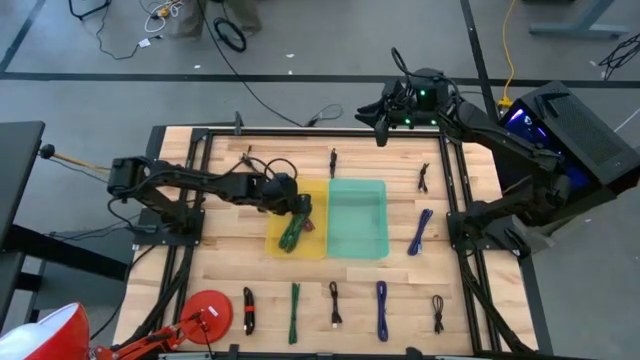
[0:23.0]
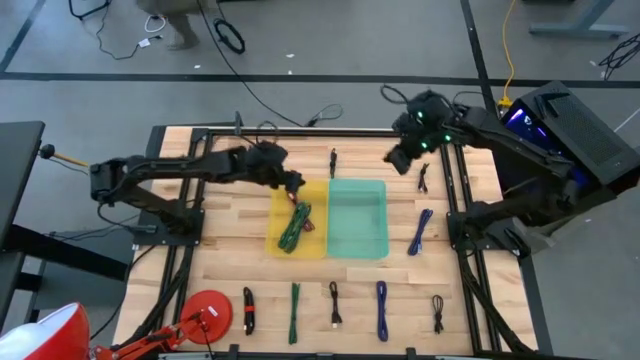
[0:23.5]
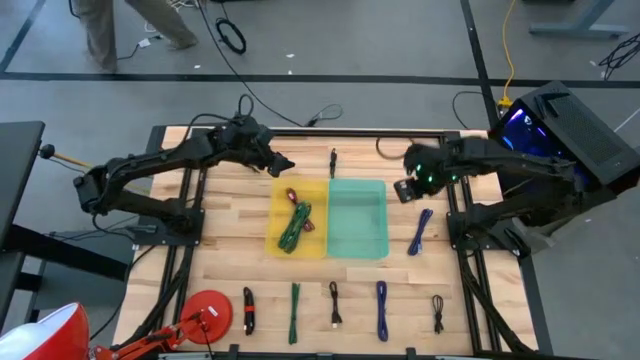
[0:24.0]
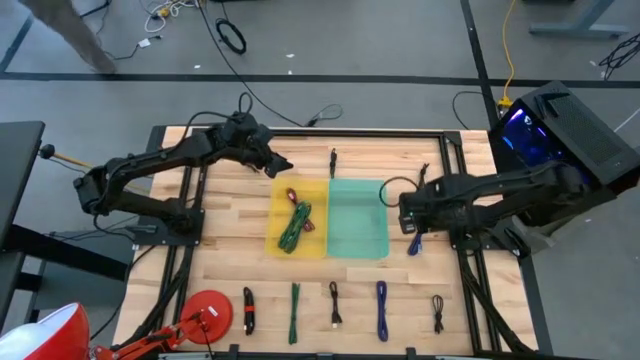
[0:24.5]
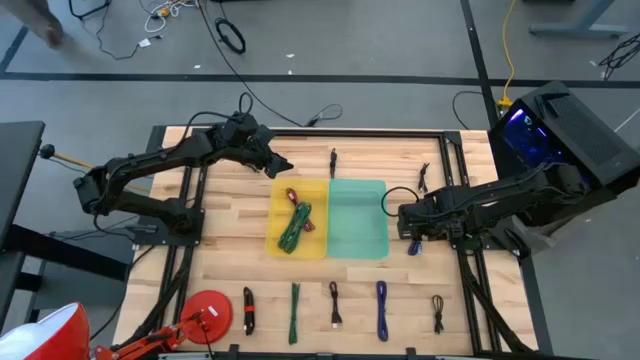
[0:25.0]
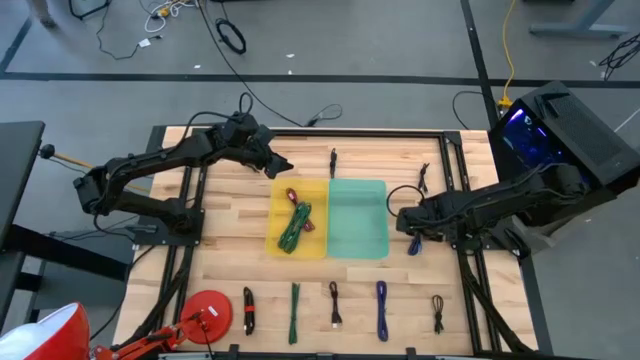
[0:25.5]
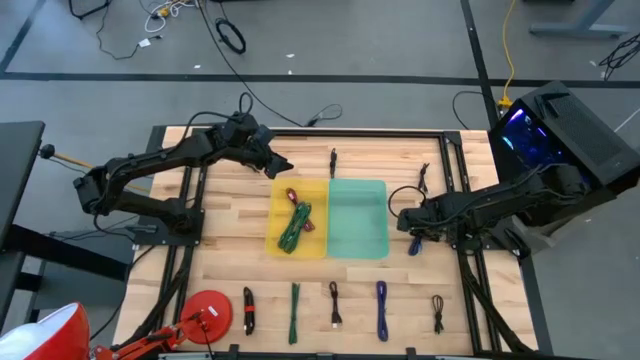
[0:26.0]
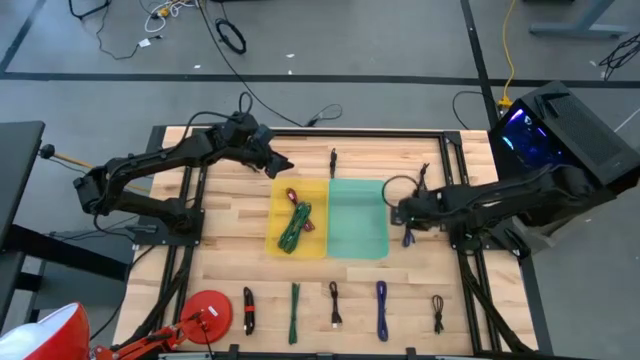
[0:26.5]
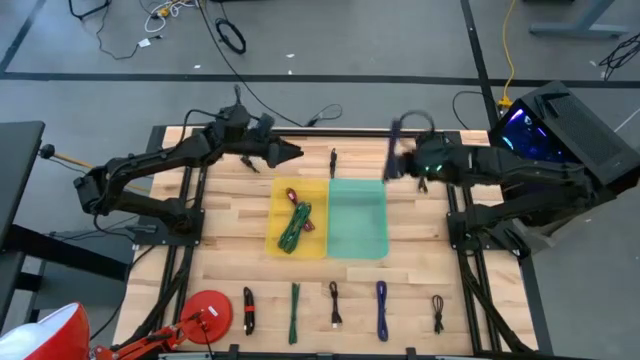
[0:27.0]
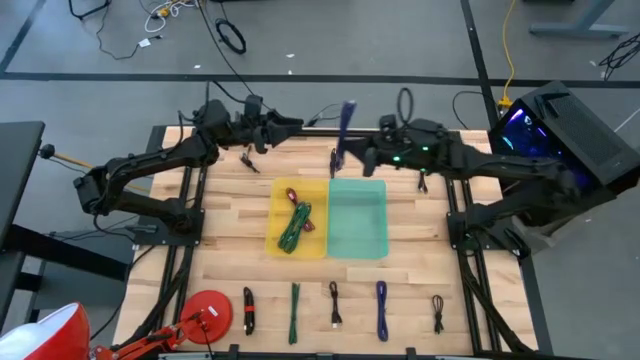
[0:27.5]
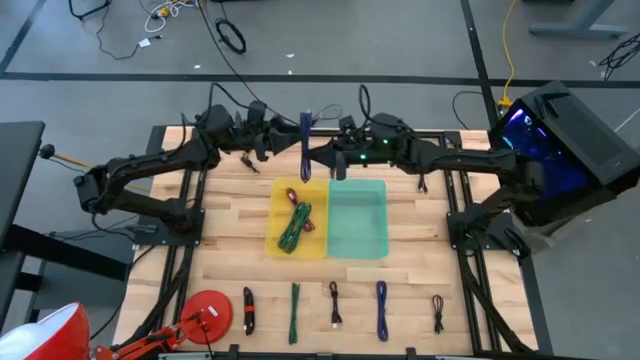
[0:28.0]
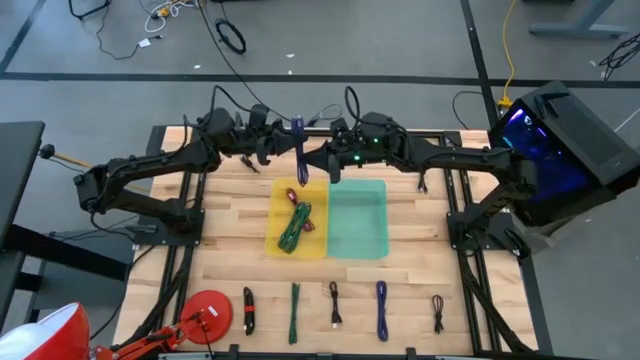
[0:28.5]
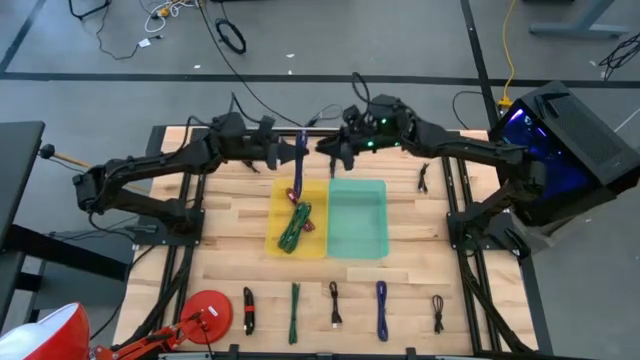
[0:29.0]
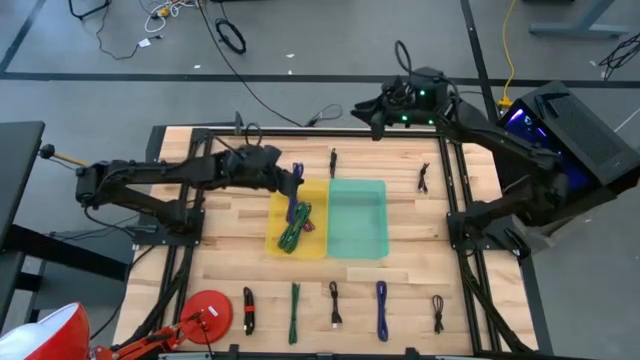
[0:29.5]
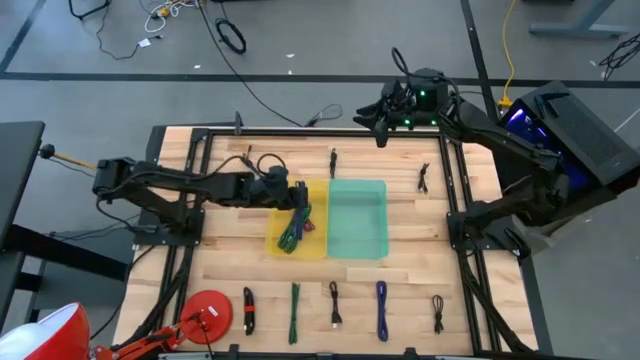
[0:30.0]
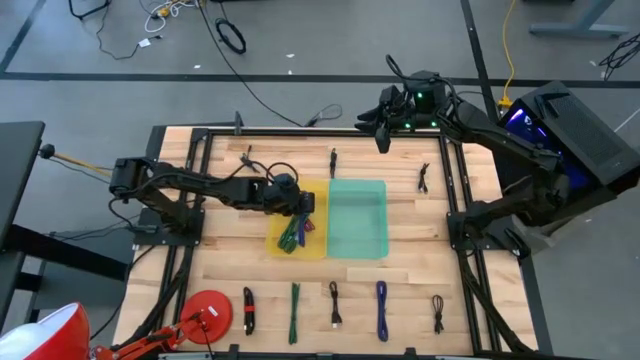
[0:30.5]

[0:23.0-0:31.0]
Task: Pick & Place USB Port
Put the blue patterned charger cable into the yellow bin

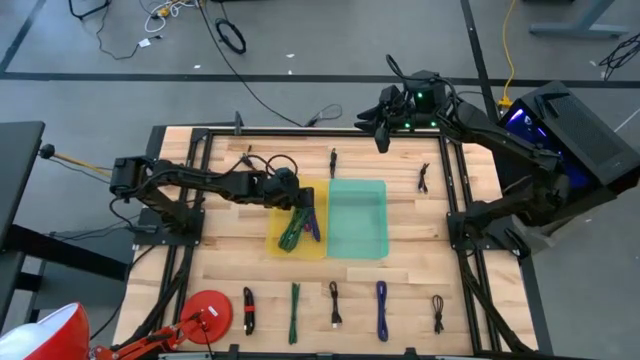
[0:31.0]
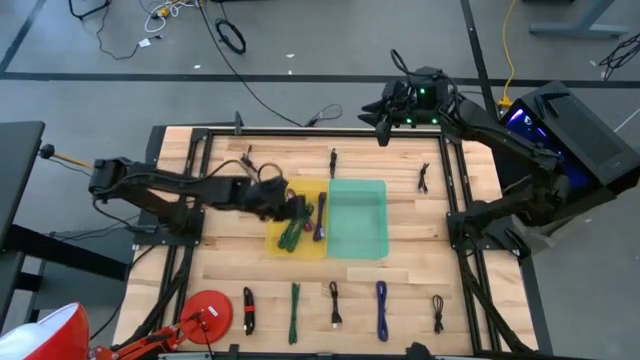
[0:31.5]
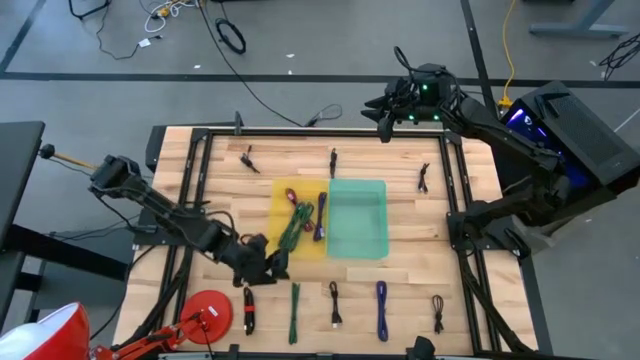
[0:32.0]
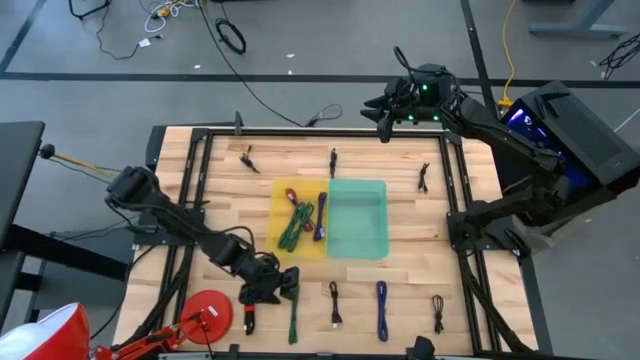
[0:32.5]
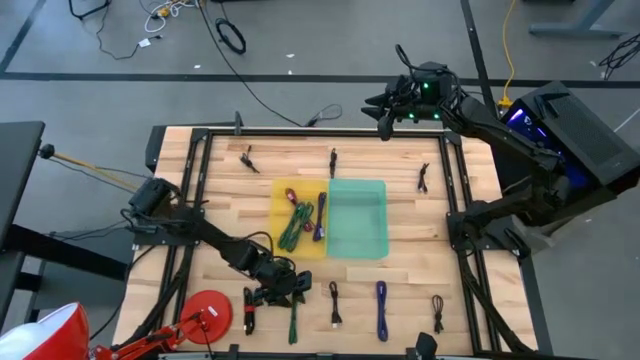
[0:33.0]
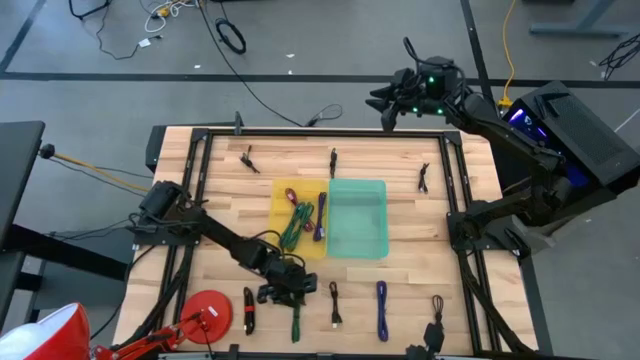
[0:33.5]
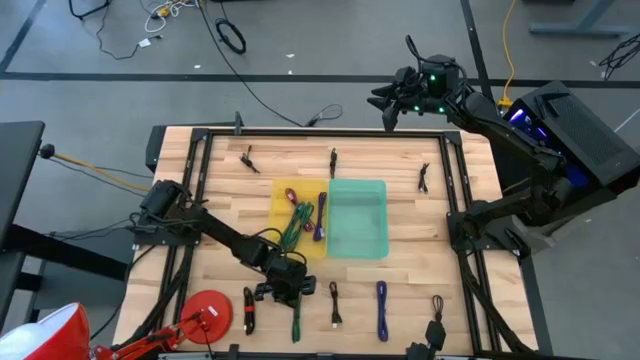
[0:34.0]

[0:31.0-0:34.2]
Put the green patterned charger cable into the yellow bin

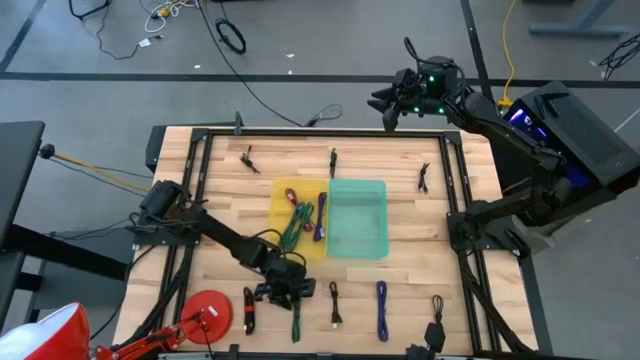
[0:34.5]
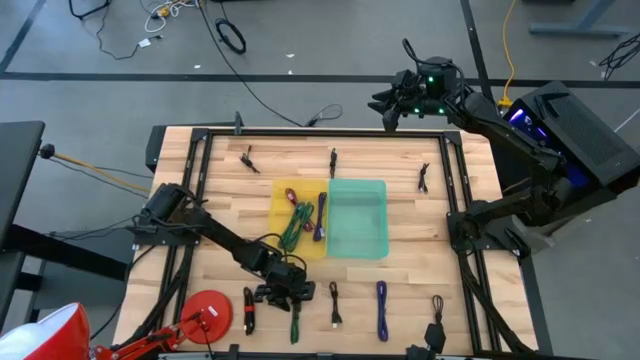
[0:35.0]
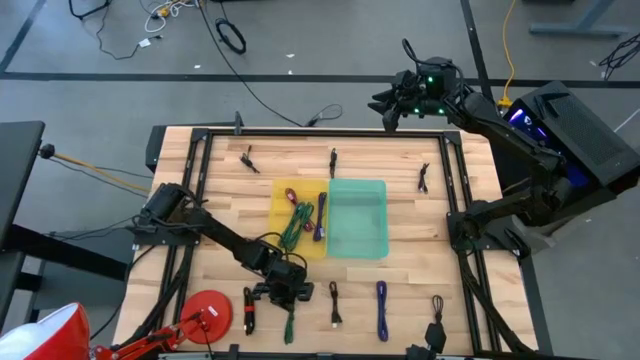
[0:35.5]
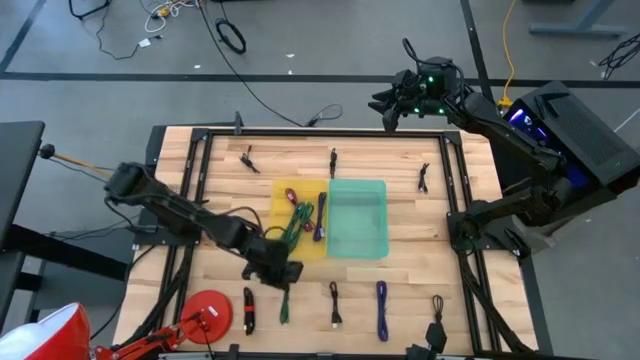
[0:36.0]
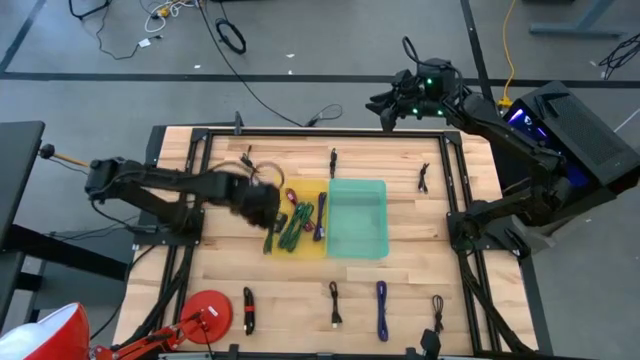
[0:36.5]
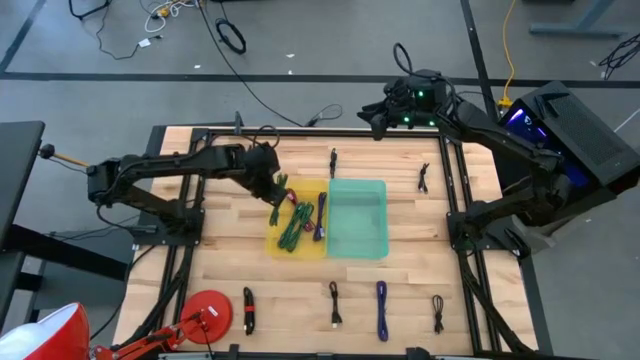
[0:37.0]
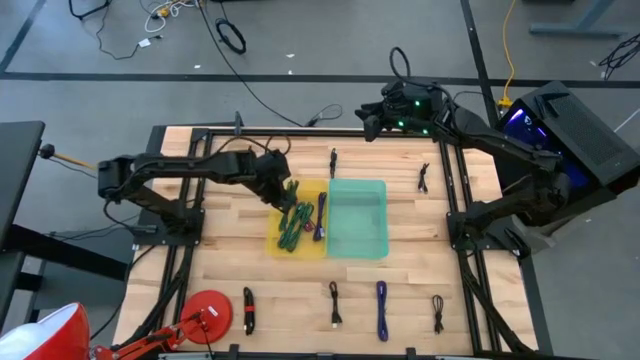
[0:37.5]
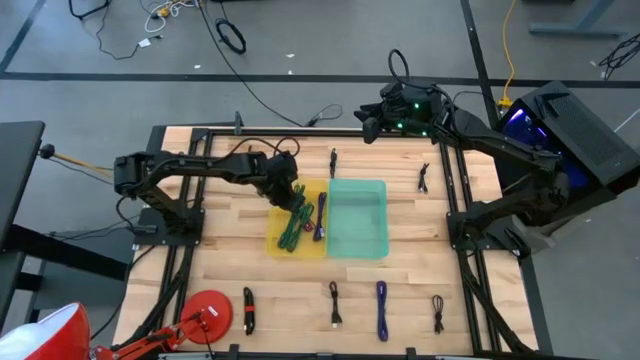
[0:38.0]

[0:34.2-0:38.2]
Put the green patterned charger cable into the yellow bin

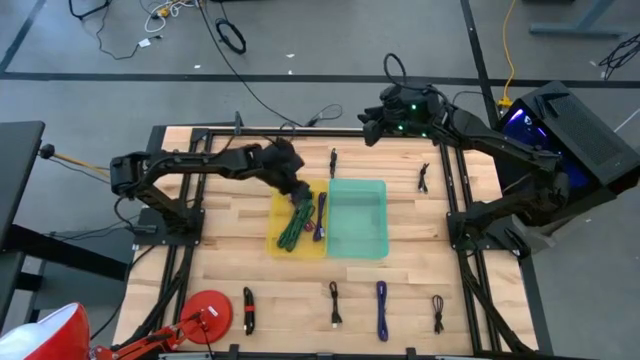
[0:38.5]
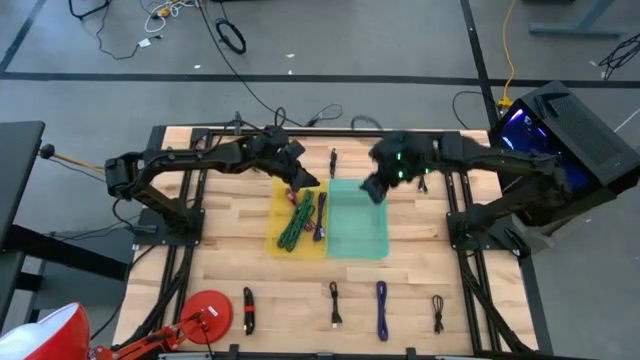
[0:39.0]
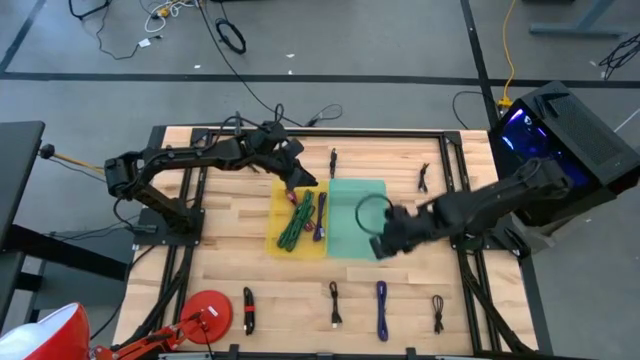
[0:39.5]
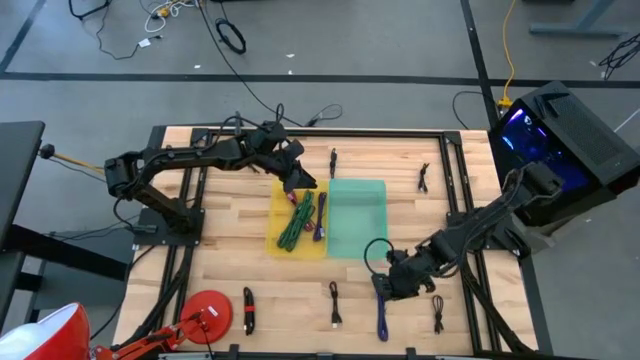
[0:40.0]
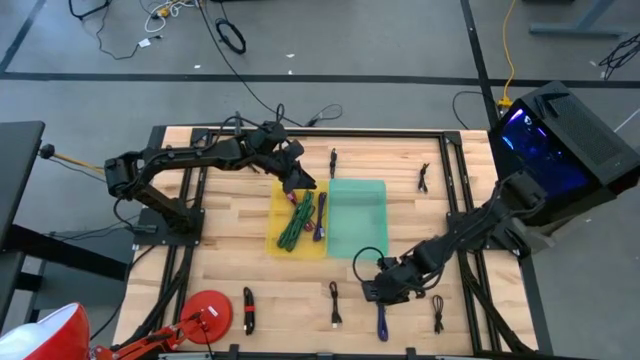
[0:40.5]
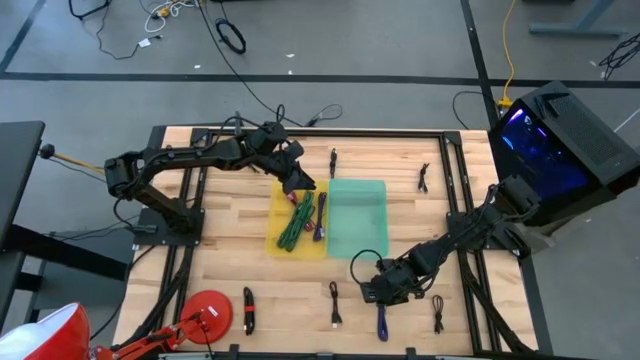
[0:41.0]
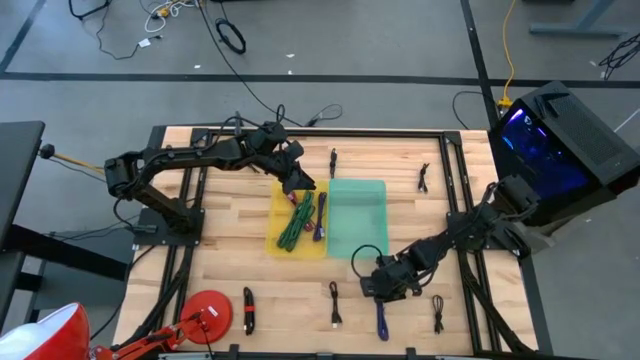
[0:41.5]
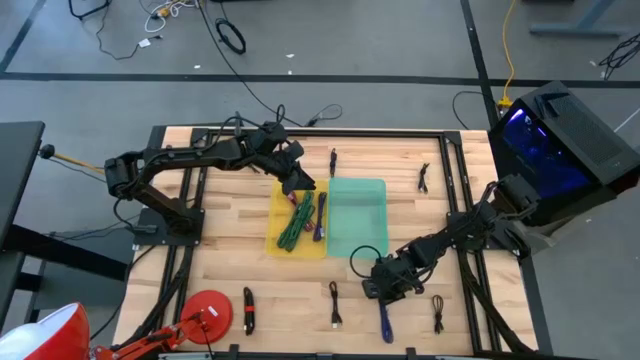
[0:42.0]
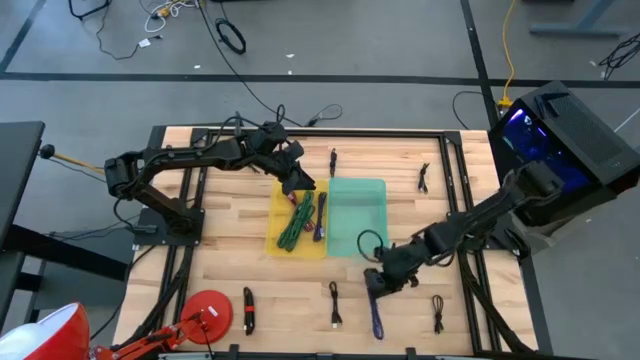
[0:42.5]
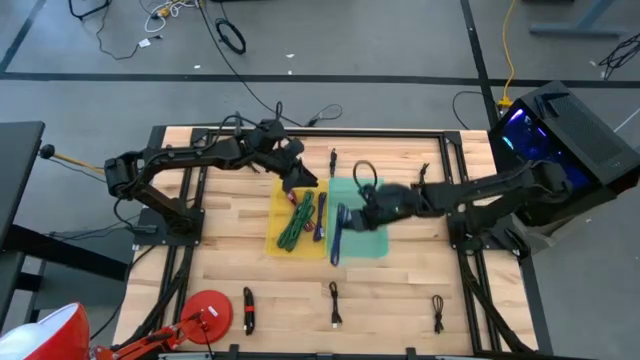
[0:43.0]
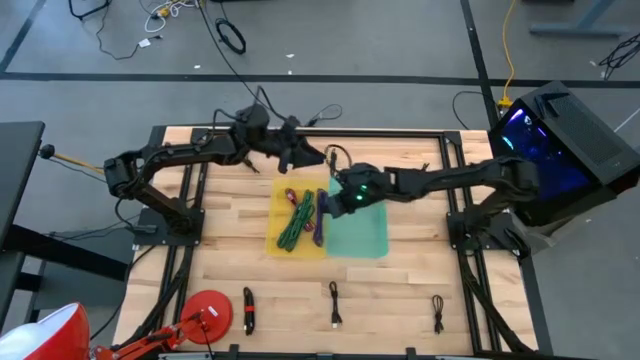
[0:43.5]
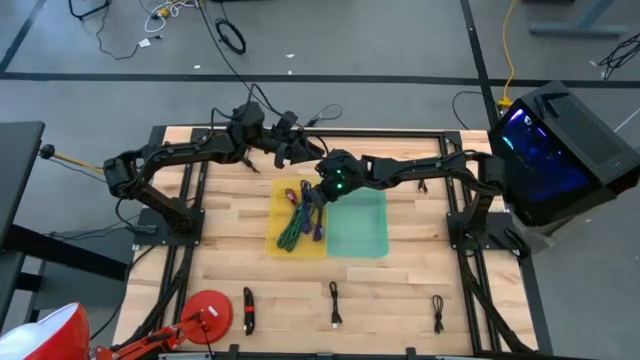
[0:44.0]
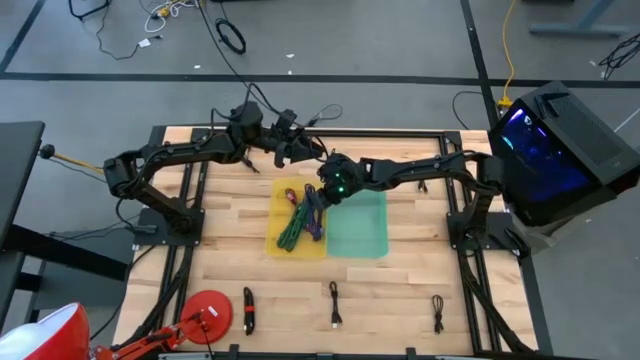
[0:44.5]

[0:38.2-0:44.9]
Put the blue patterned charger cable into the yellow bin
